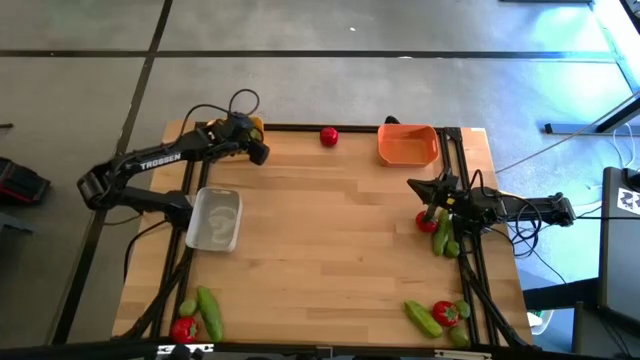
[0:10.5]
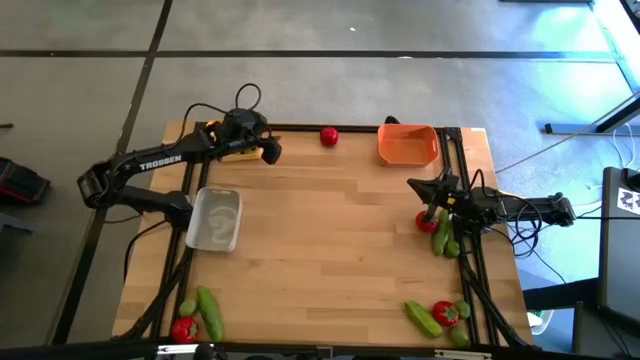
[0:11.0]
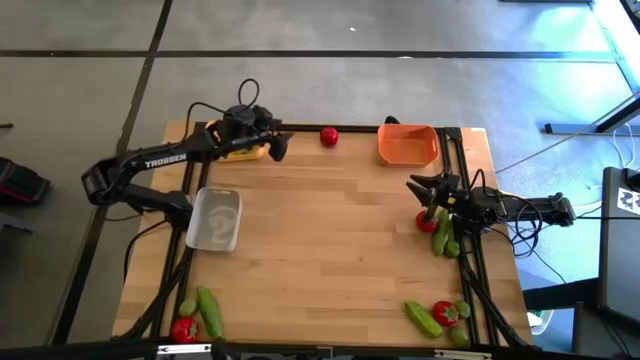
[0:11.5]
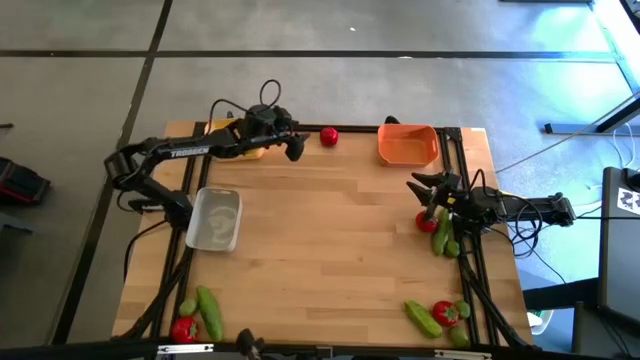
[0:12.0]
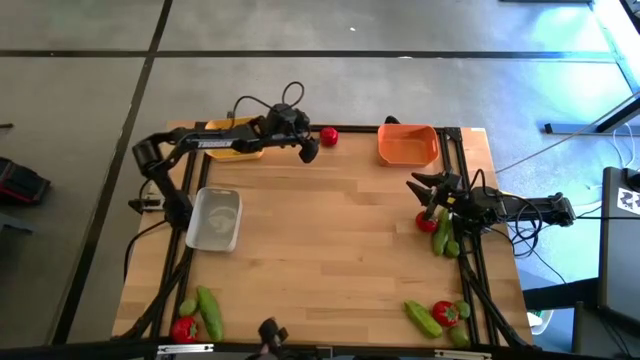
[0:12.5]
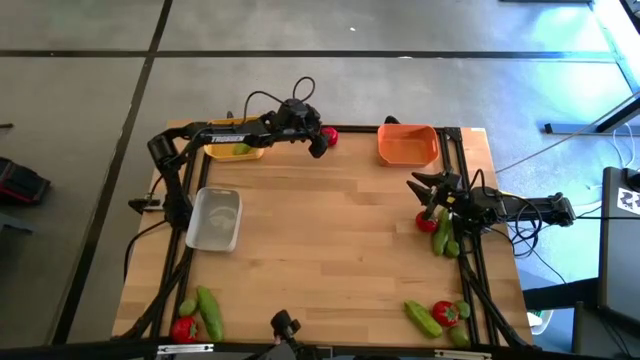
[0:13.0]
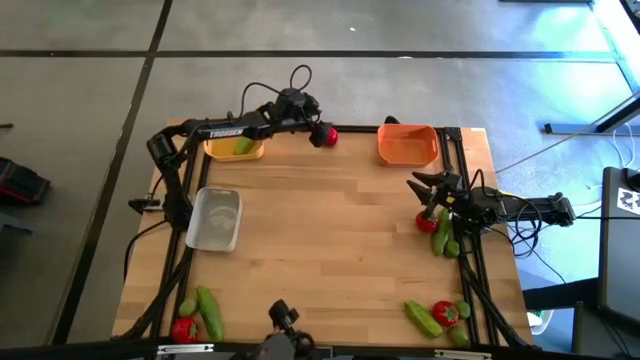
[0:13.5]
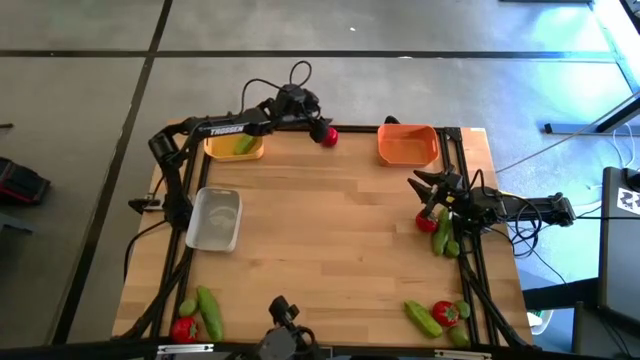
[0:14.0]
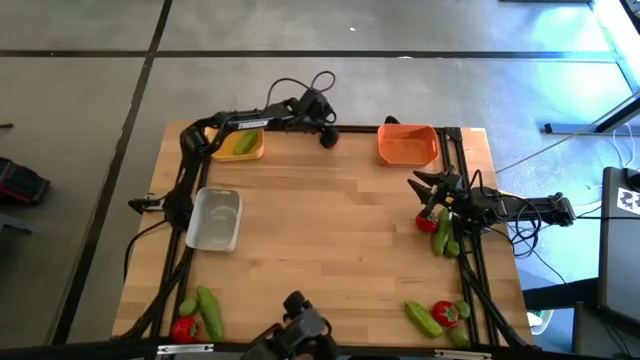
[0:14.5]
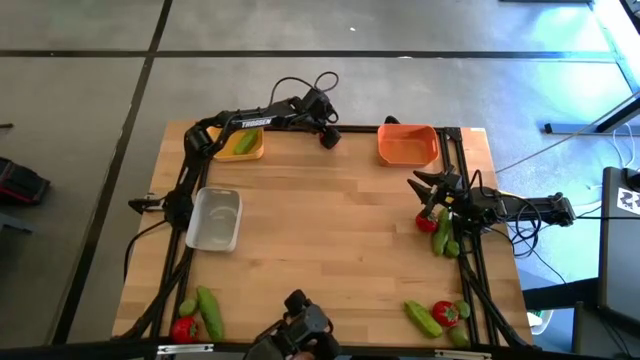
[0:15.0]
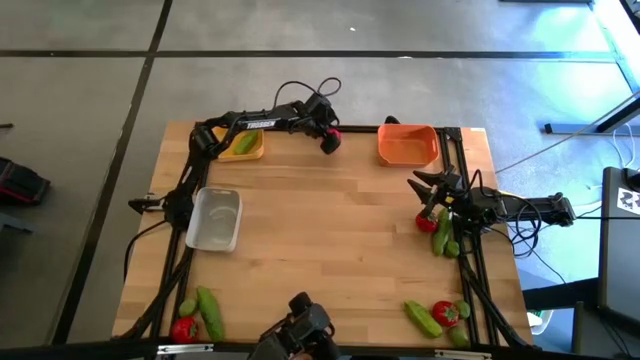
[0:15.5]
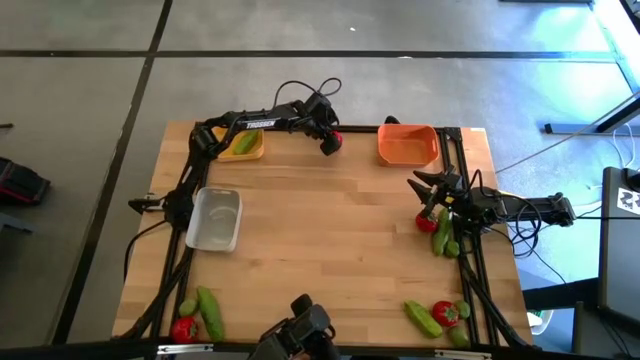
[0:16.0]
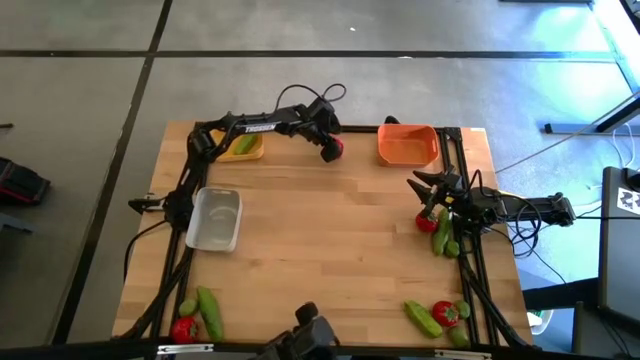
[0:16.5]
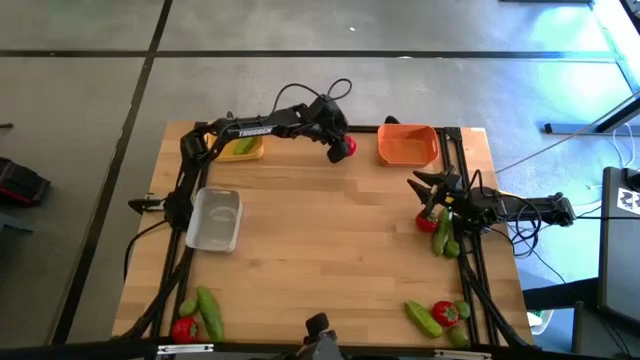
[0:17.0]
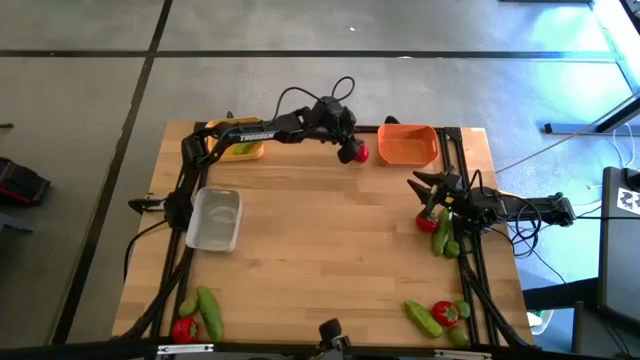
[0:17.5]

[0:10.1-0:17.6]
Task: Sort produce into baskets
Put the top red tomato into the orange bin

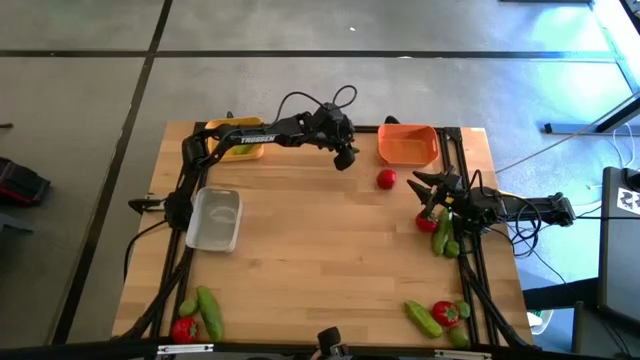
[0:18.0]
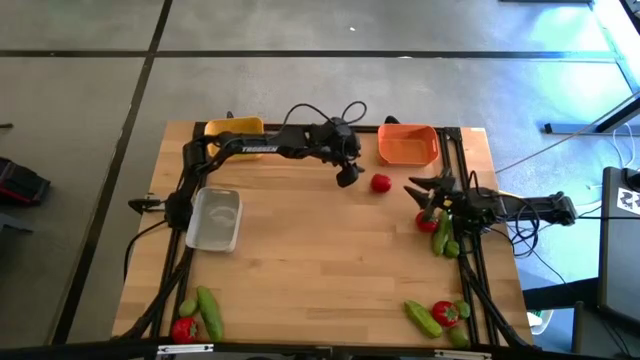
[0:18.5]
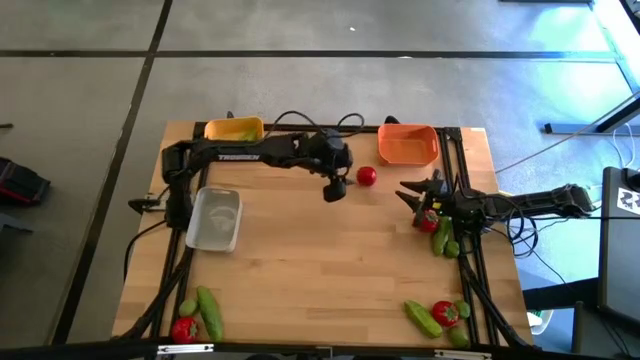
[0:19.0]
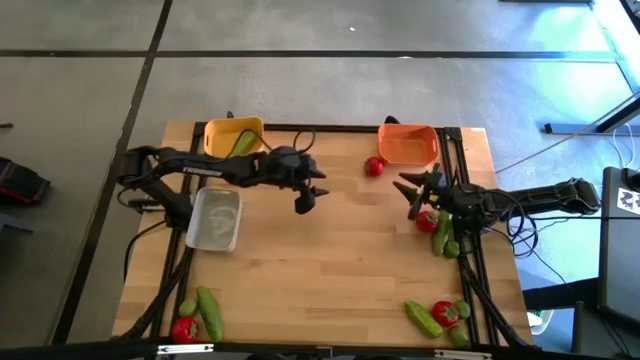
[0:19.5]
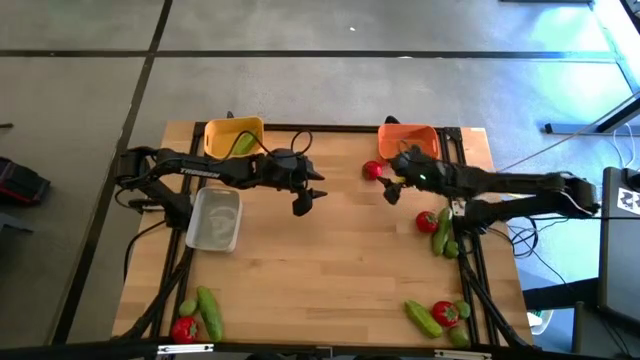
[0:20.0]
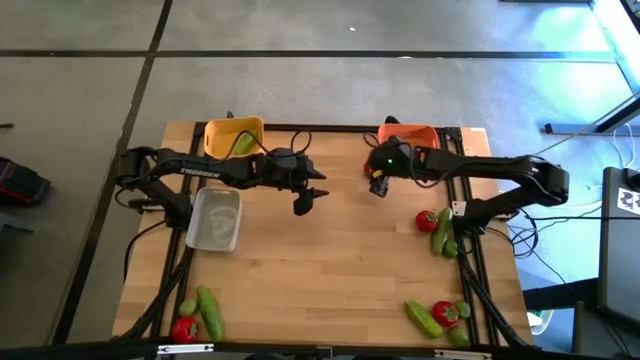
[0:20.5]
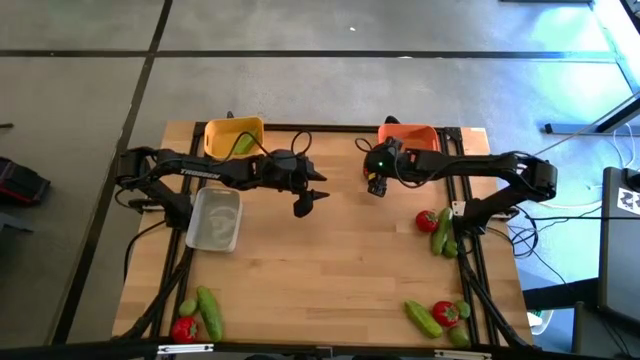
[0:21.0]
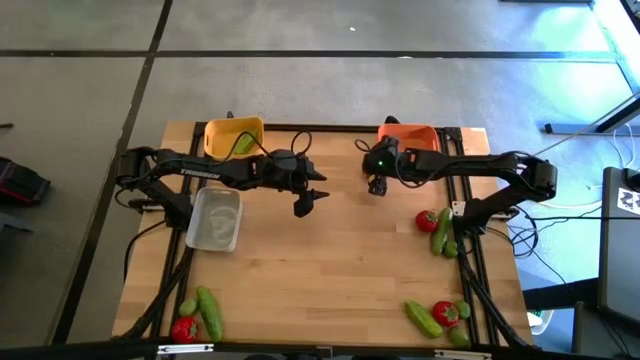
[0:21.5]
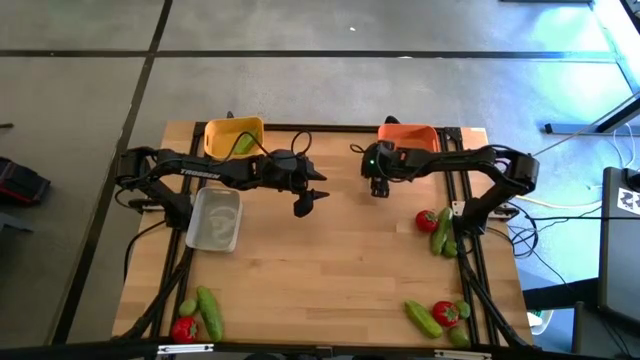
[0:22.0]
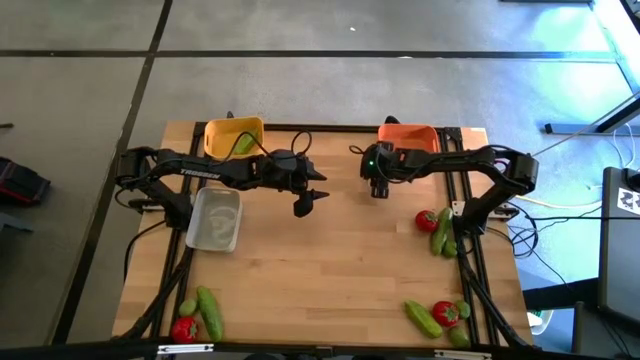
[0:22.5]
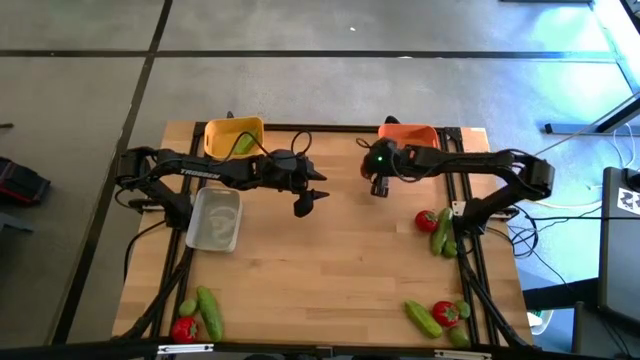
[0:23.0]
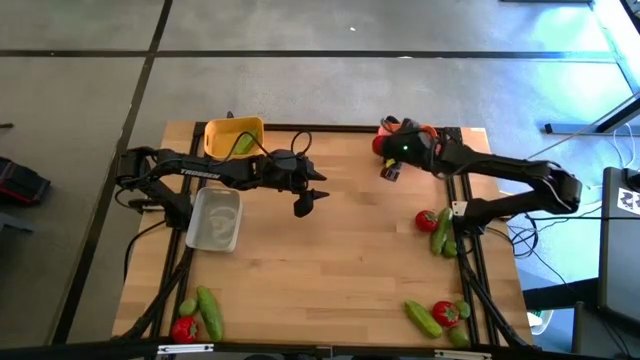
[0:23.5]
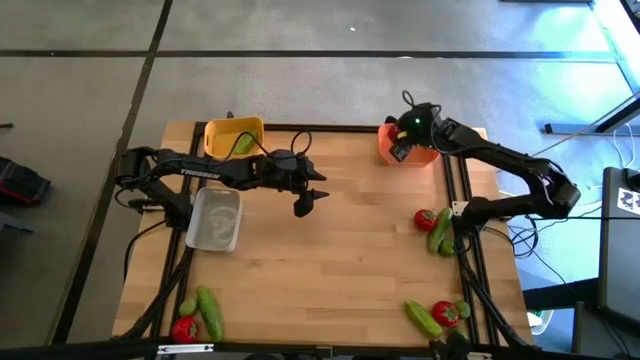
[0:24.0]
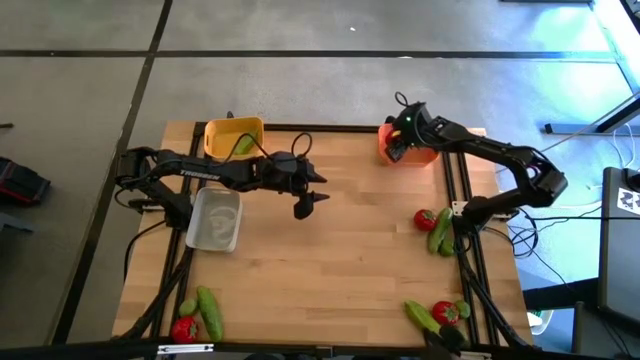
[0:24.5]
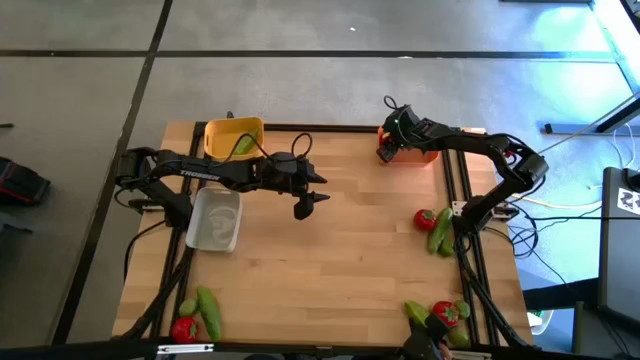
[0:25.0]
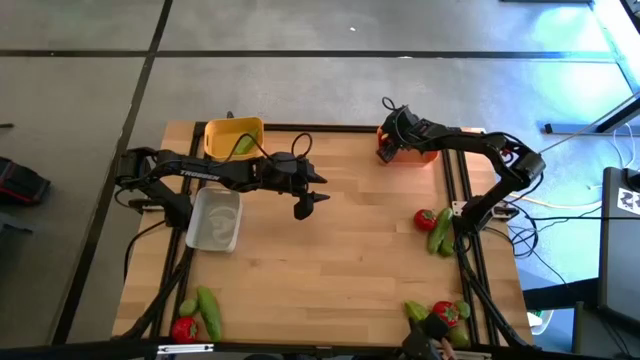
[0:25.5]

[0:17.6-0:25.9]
Put the top red tomato into the orange bin

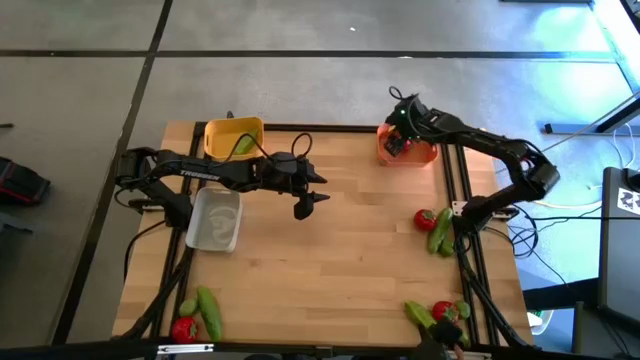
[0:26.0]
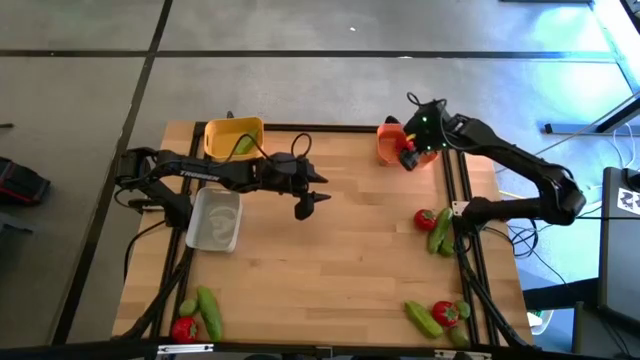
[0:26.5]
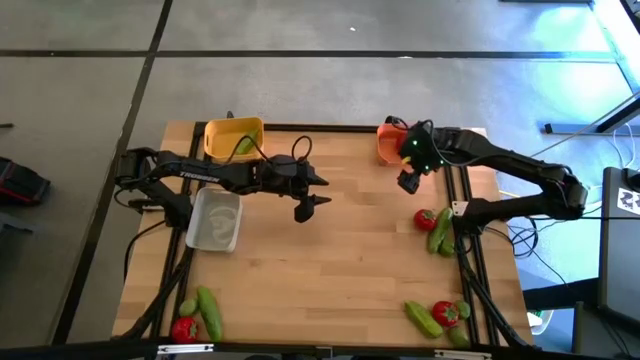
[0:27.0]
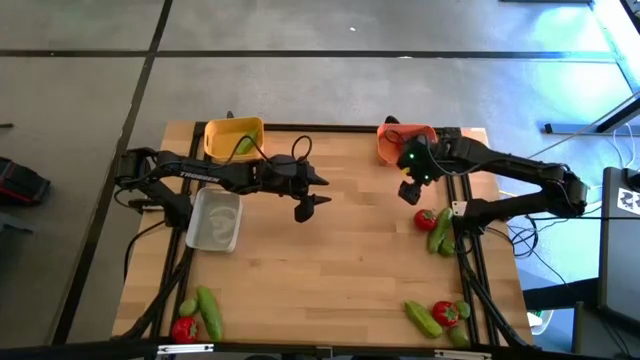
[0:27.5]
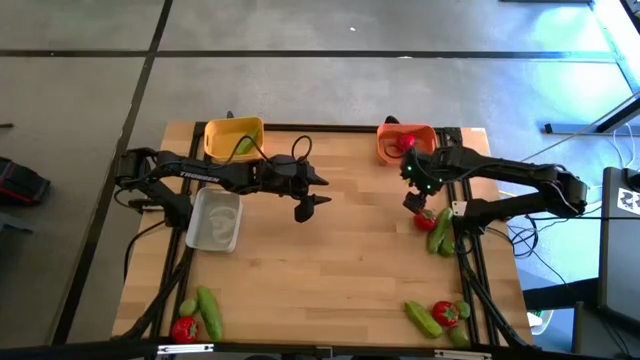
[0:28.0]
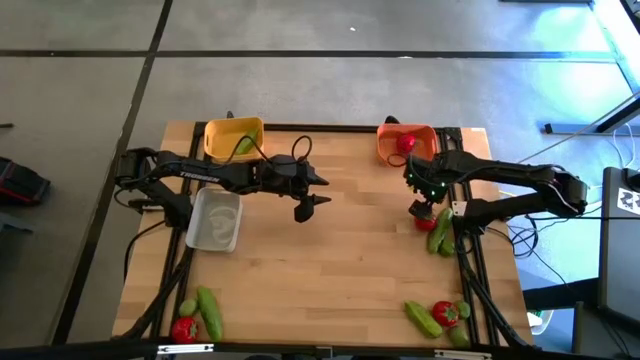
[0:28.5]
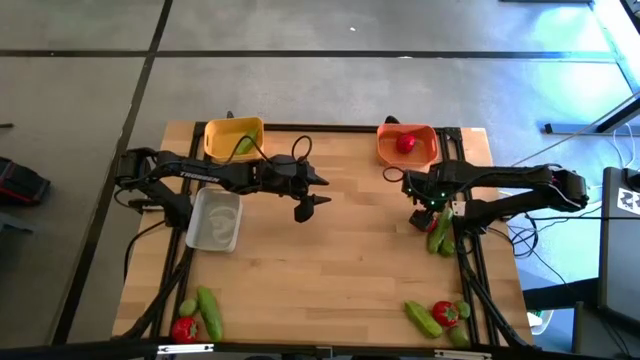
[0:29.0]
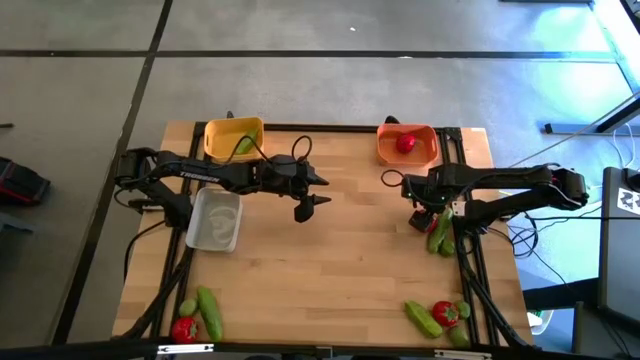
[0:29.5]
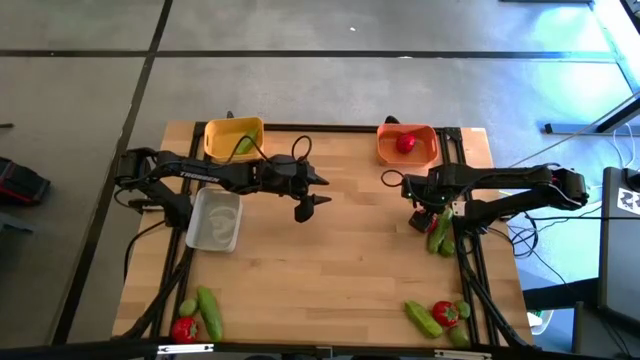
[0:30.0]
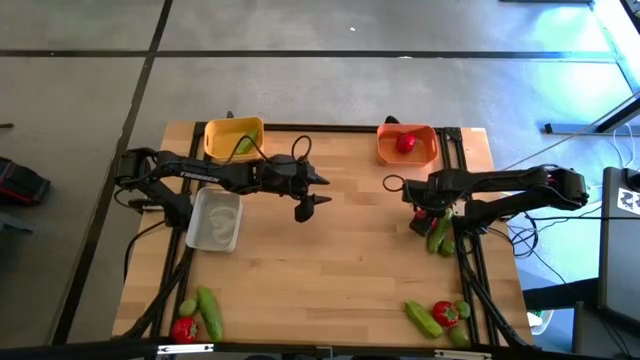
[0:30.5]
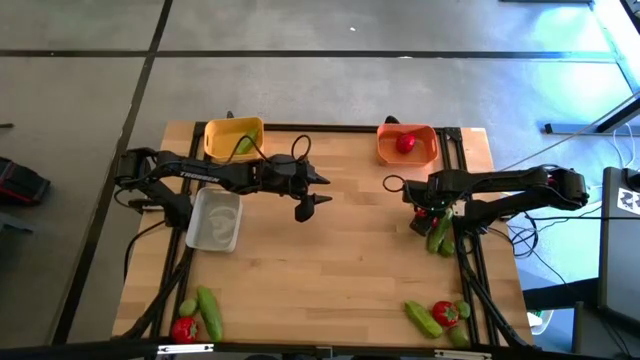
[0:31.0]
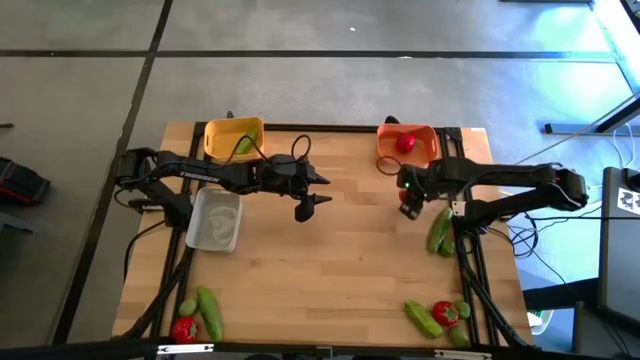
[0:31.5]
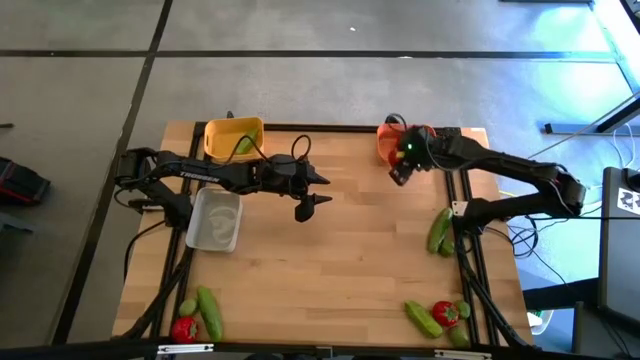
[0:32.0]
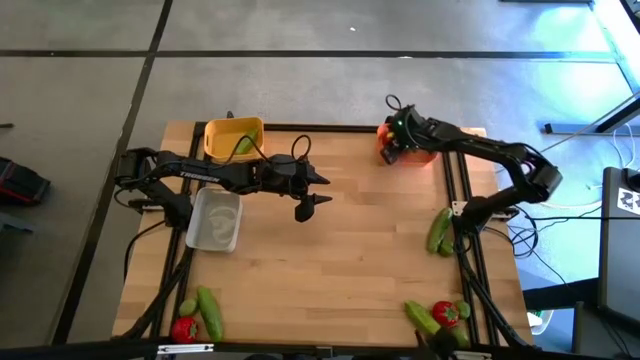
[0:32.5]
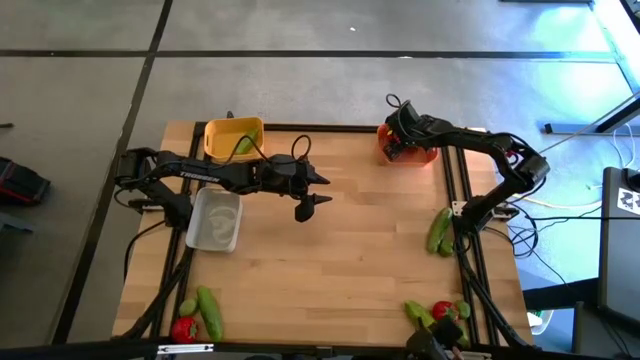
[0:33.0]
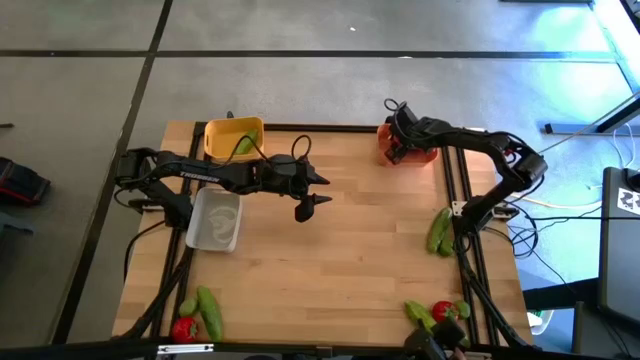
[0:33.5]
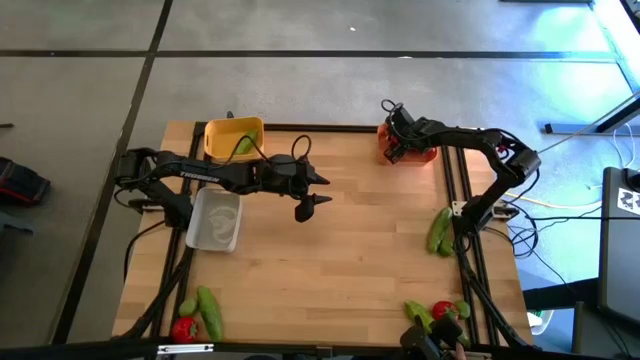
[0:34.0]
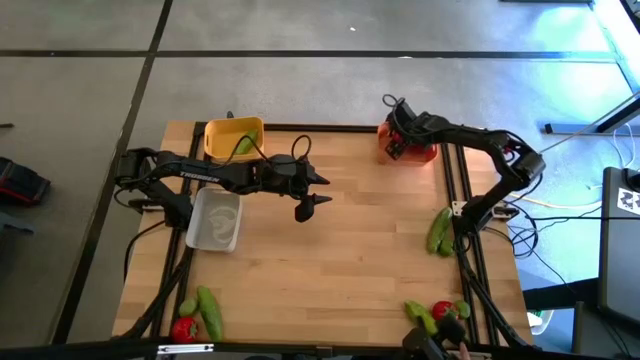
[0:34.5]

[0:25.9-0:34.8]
Put the top red tomato into the orange bin
